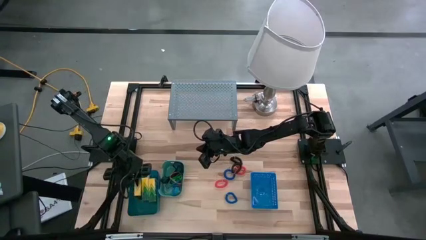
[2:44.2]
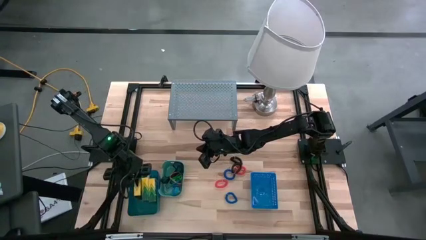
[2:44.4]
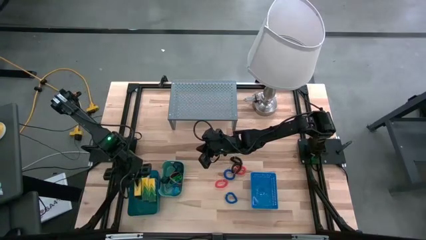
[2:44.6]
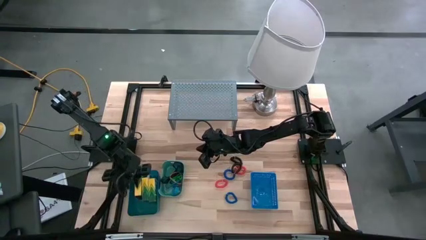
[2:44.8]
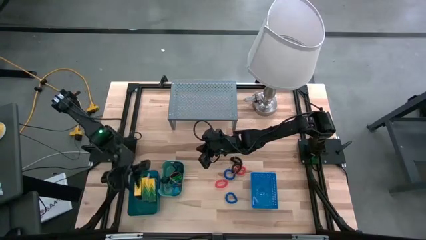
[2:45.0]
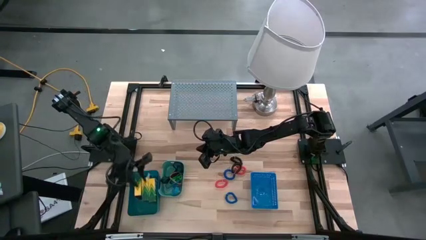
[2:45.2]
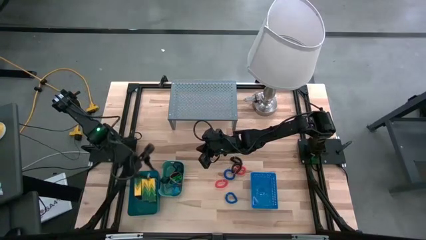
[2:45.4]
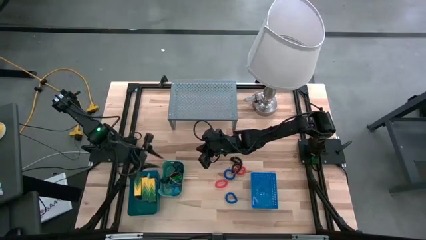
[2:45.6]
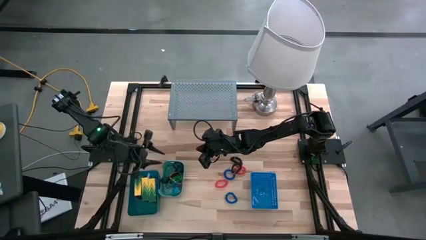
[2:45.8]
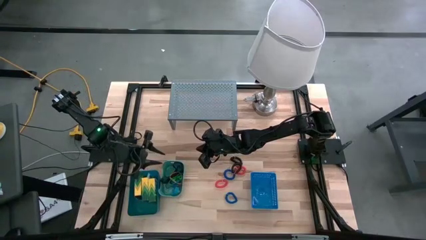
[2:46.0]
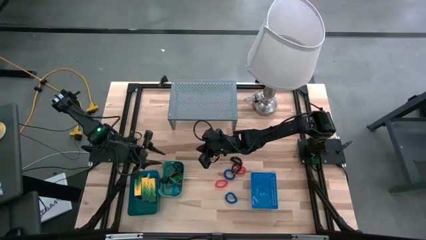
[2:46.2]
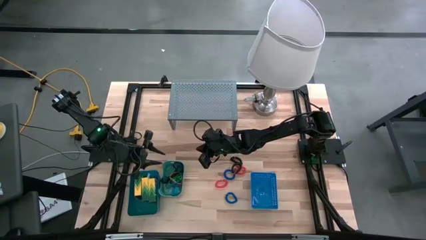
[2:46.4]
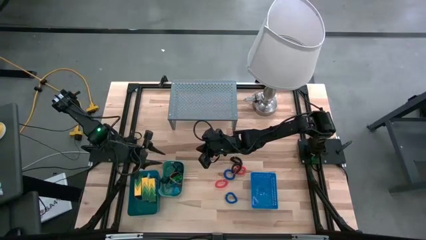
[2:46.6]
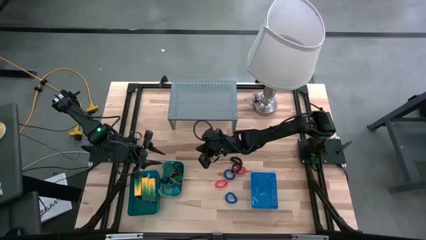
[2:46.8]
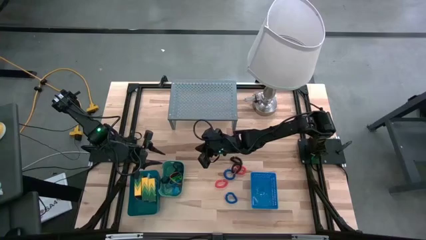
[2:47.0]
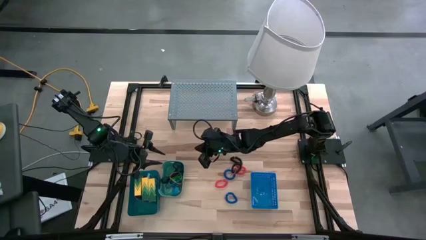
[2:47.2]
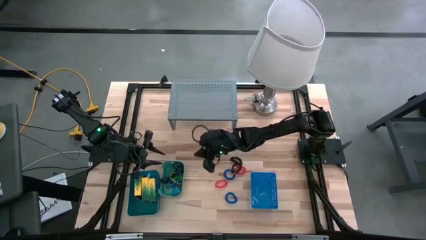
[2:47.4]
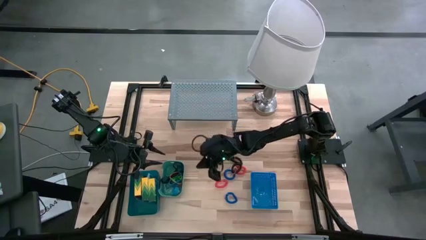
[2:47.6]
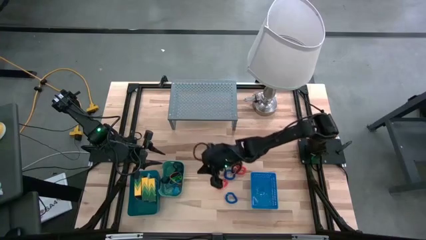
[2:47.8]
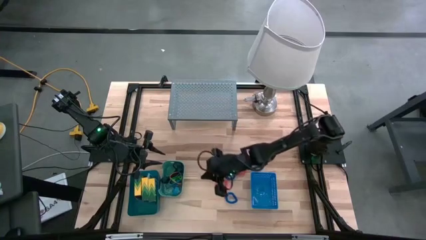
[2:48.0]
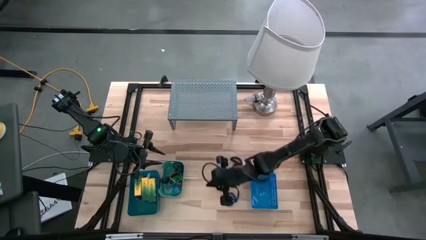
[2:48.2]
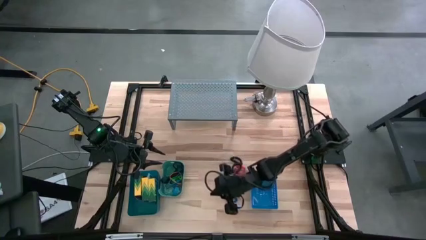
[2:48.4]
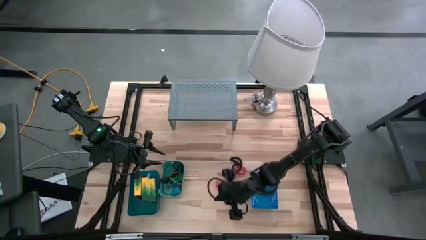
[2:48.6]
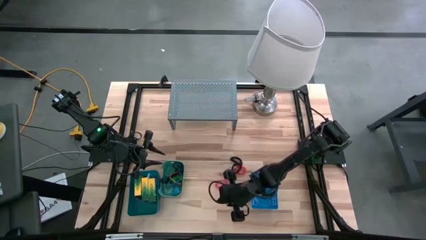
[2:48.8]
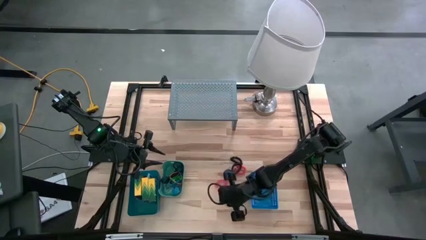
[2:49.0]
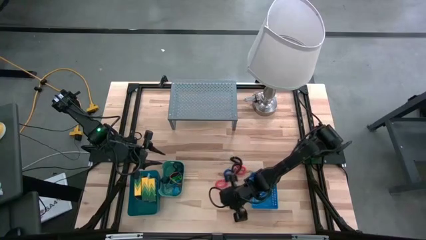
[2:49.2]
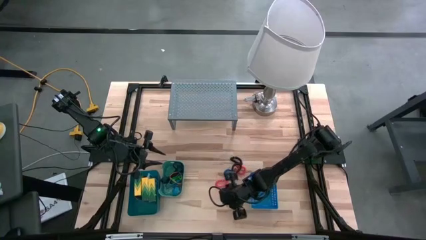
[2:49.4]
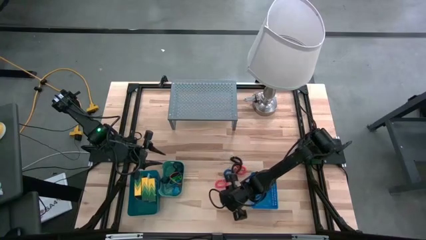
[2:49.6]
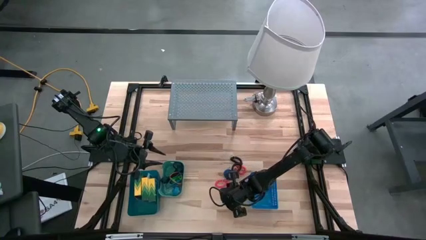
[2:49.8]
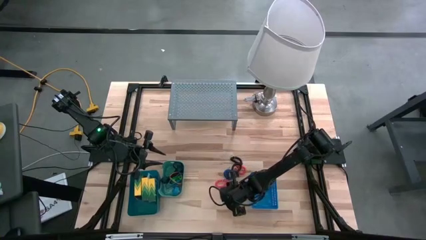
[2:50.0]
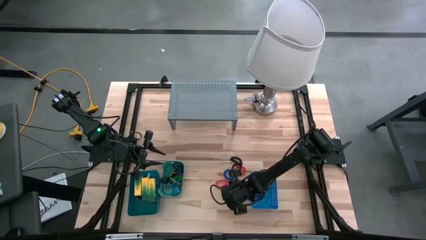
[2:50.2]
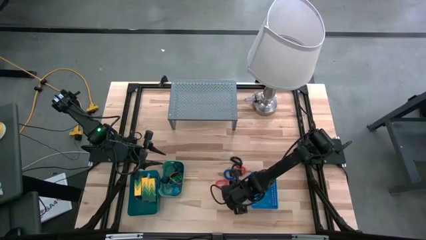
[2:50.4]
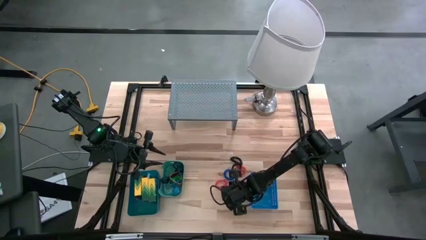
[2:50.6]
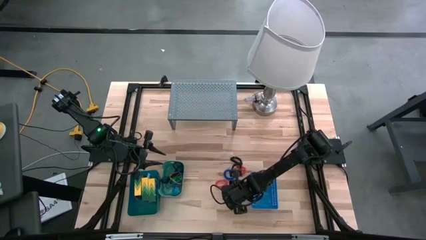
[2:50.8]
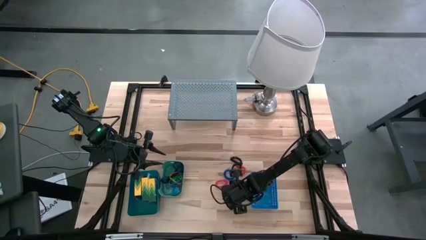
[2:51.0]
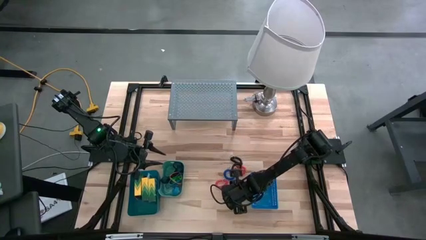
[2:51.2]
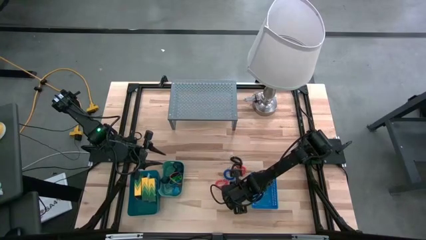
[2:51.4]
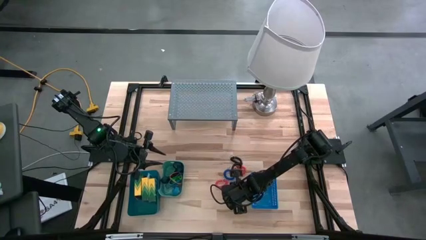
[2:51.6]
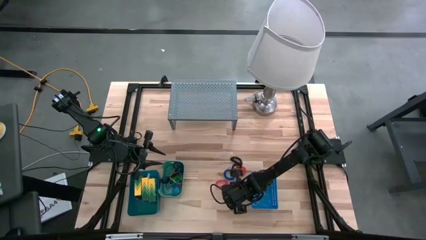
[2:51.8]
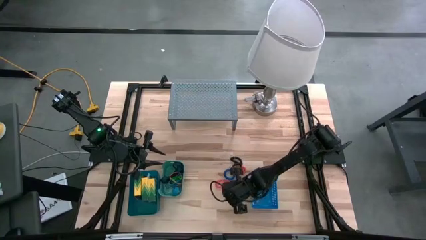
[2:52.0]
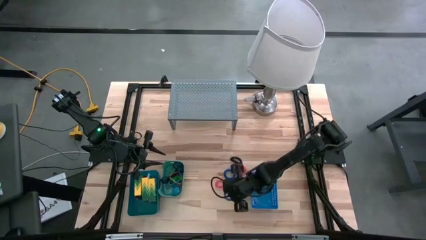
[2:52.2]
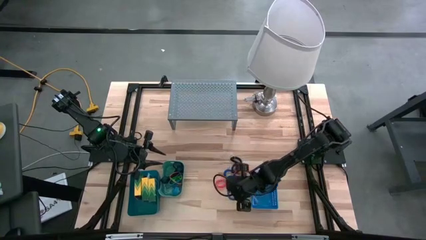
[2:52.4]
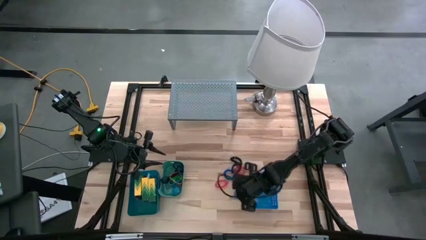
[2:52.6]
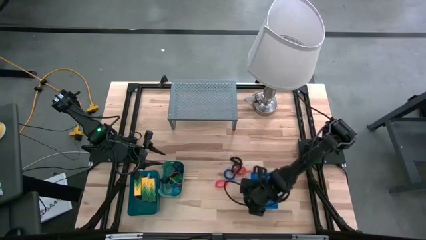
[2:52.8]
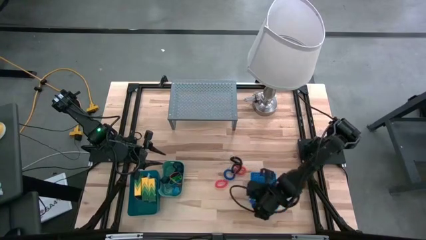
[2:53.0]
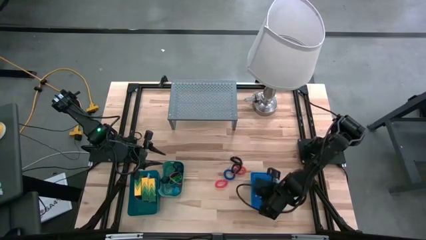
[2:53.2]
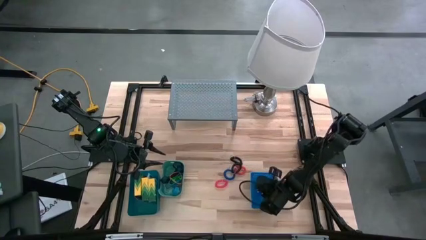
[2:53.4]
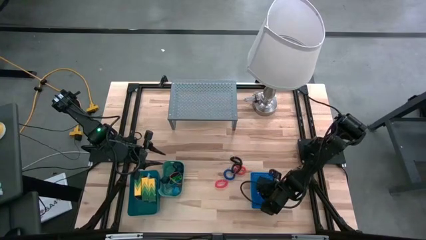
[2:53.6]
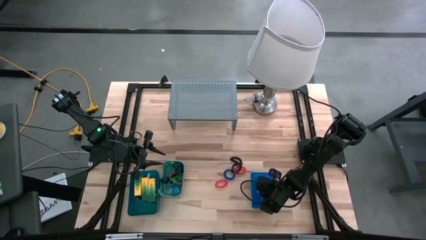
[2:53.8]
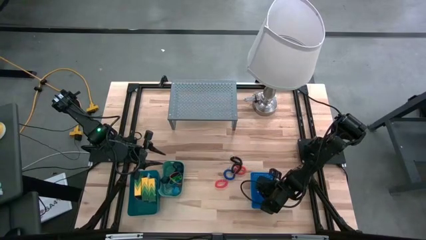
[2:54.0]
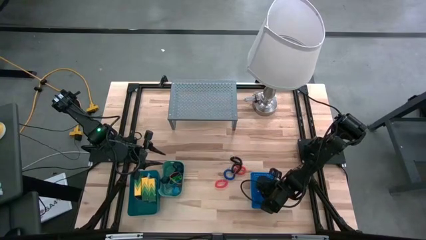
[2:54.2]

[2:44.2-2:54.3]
Task: Pick & Place Office Desk Supplies
Put the bottom blue spring keychain into the blue bin

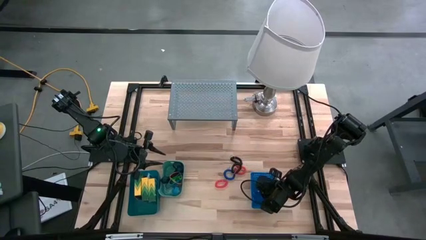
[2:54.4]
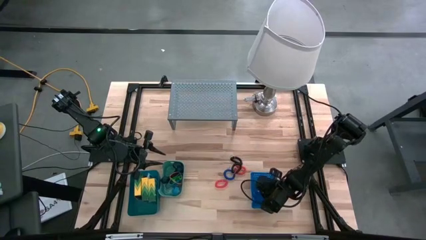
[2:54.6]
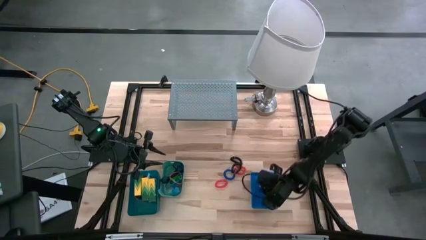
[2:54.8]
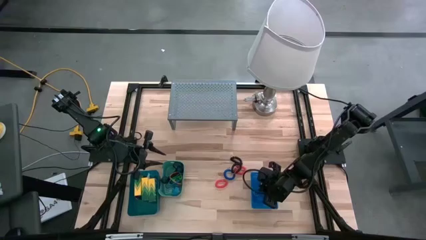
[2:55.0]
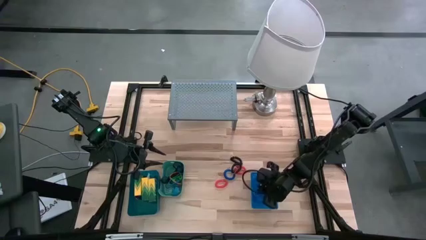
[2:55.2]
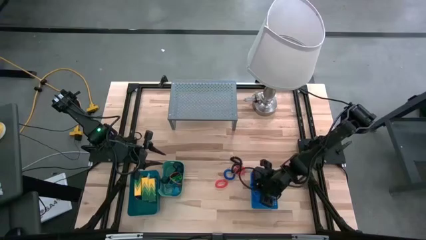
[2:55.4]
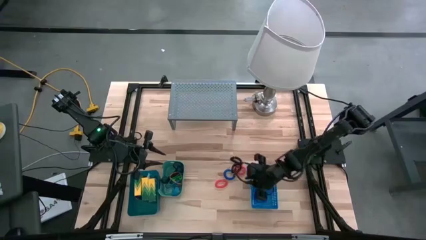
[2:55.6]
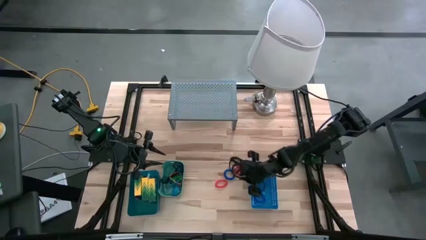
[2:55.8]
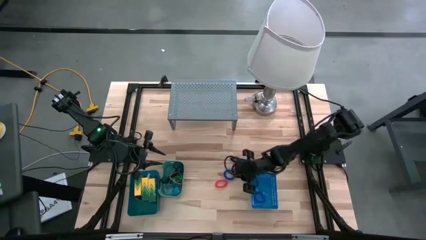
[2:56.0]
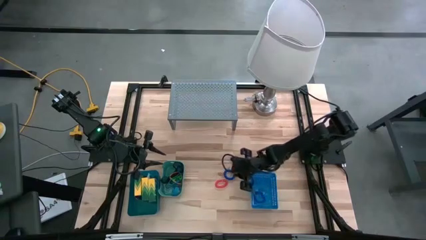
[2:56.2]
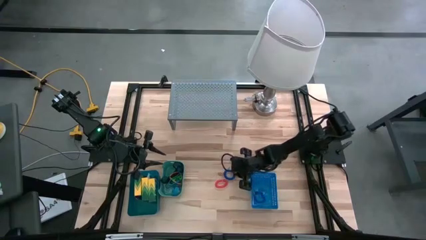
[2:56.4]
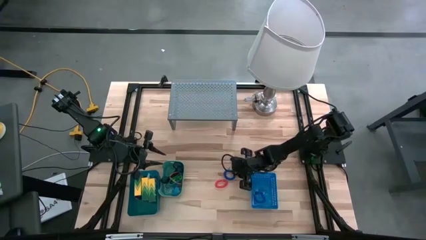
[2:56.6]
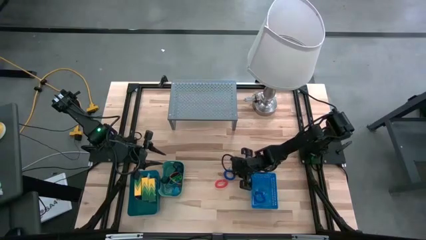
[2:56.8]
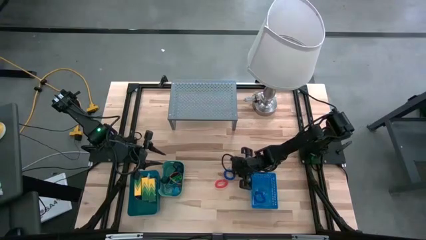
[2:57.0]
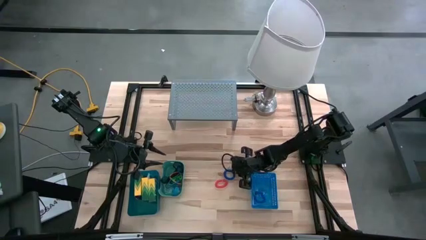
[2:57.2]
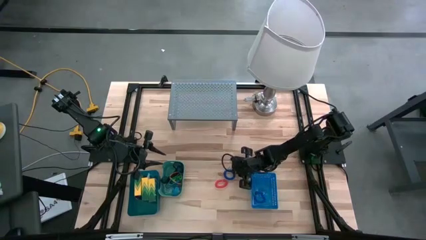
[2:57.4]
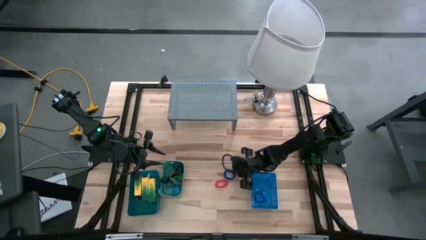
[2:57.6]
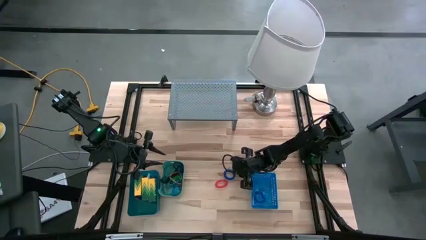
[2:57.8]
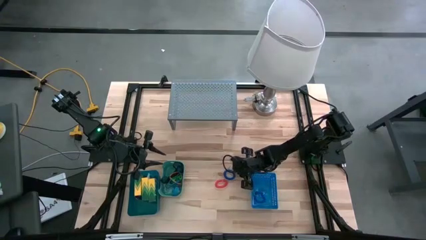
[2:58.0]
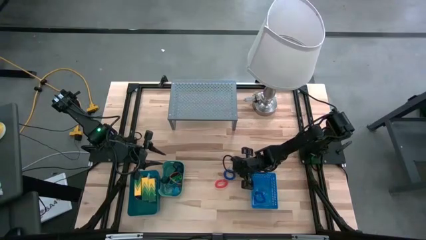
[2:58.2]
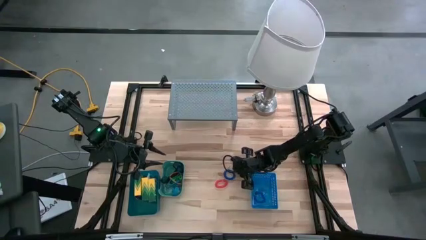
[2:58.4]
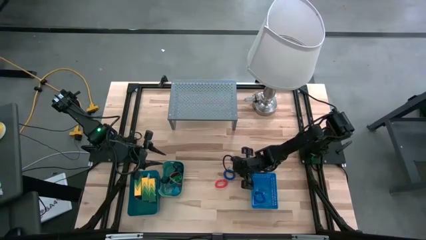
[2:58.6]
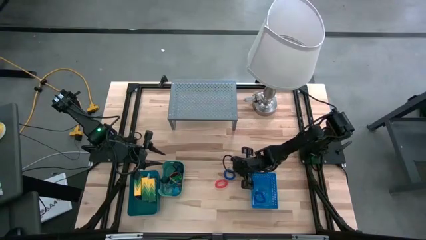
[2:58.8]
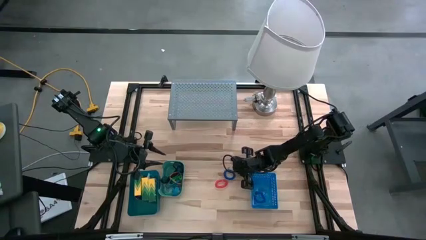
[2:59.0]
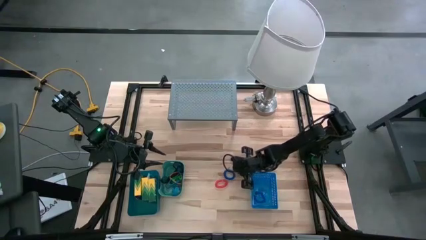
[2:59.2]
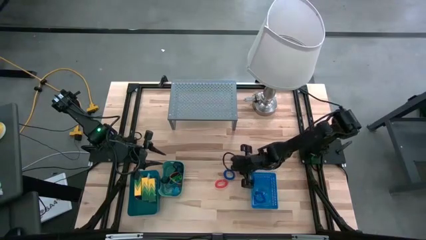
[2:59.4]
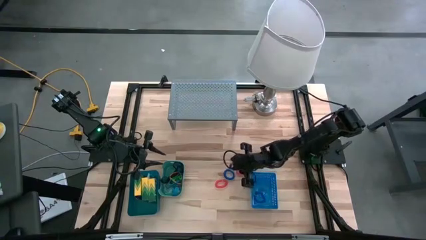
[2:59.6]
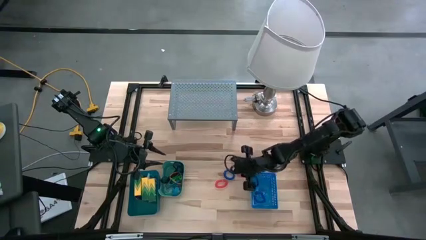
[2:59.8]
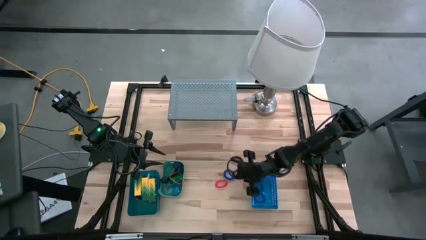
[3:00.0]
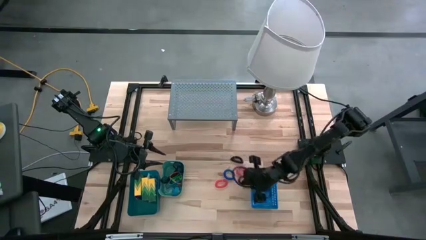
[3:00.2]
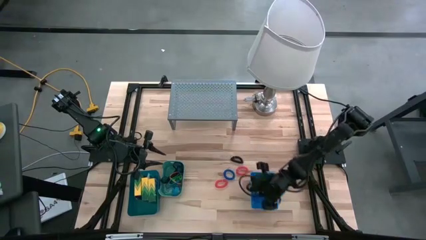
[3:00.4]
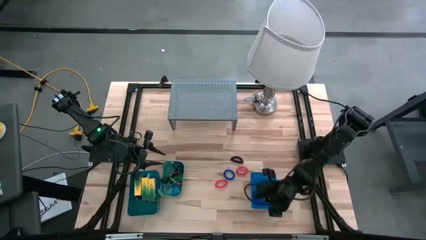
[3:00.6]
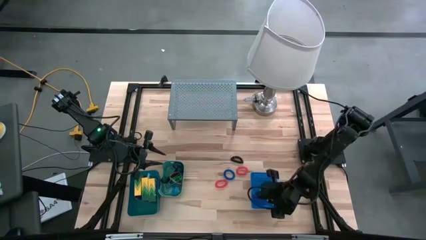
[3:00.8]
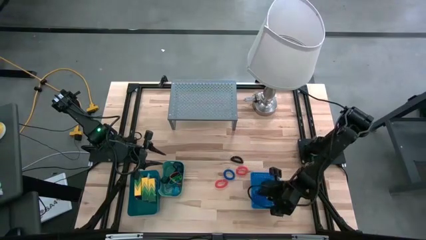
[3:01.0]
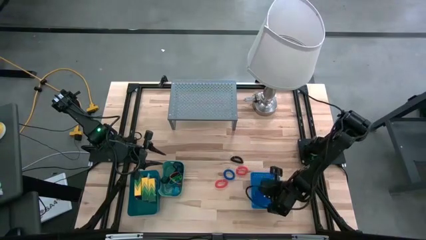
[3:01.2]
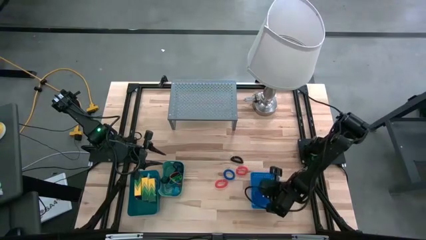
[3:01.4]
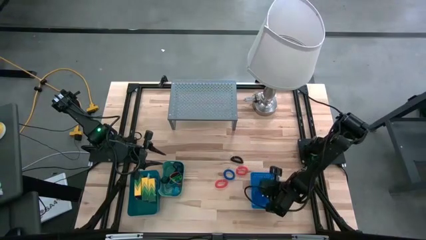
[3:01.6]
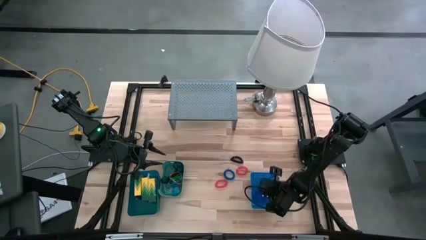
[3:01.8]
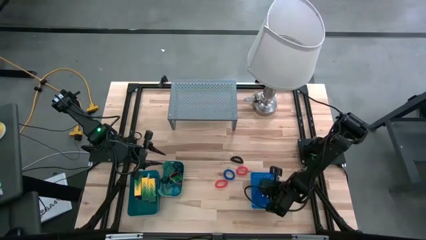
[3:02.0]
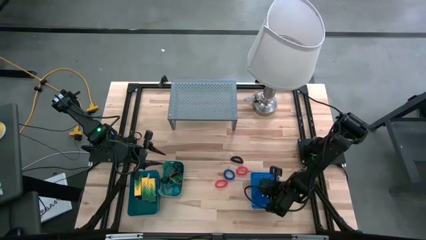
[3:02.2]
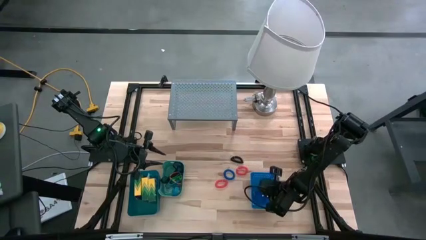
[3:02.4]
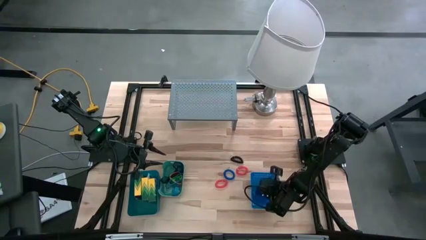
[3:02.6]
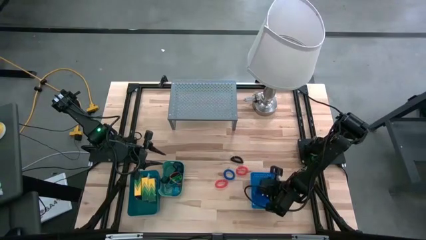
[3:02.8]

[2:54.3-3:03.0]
Put the bottom black spring keychain into the blue bin
